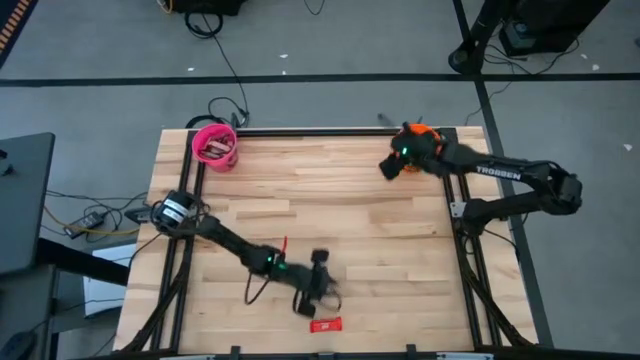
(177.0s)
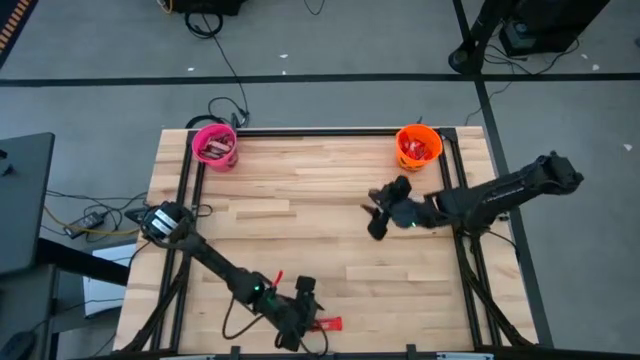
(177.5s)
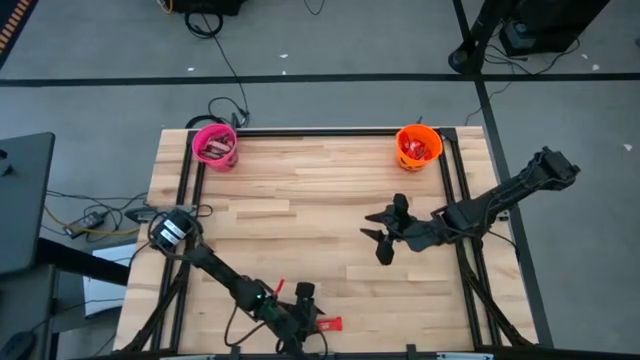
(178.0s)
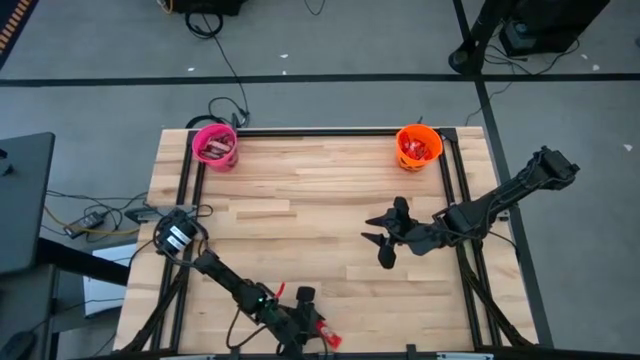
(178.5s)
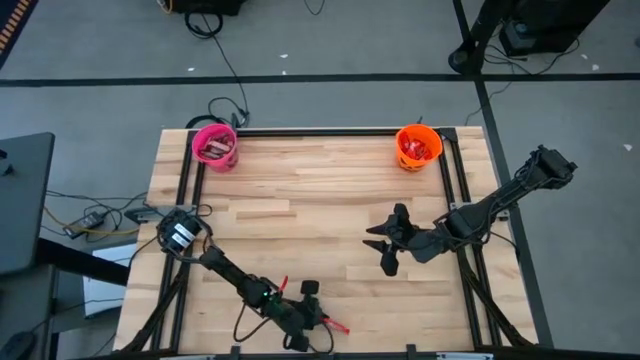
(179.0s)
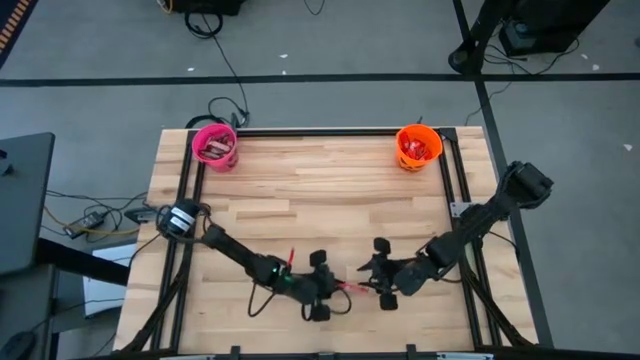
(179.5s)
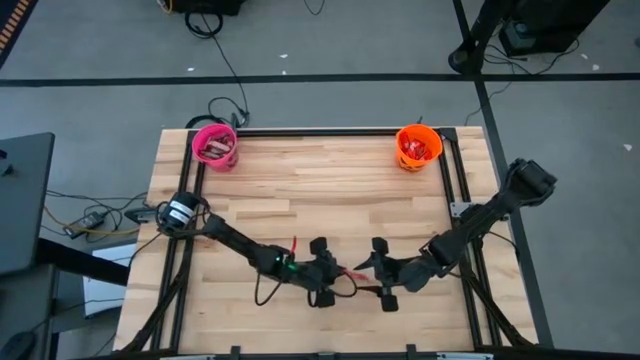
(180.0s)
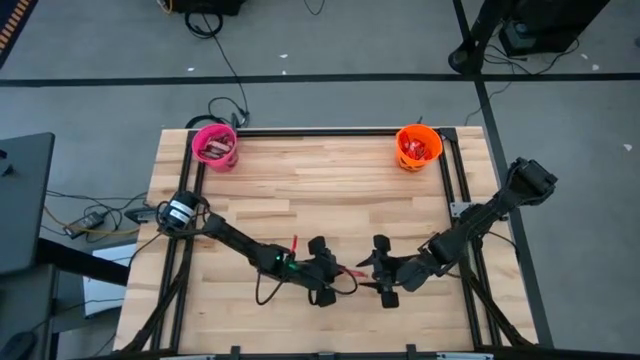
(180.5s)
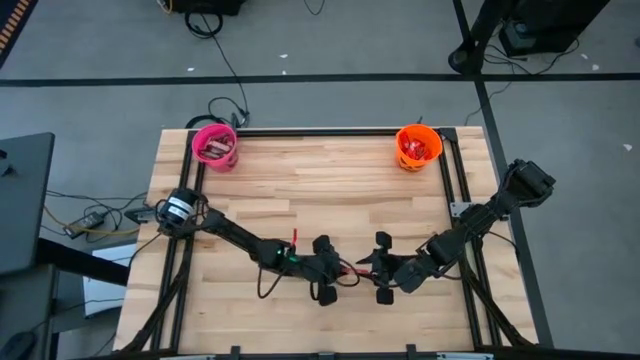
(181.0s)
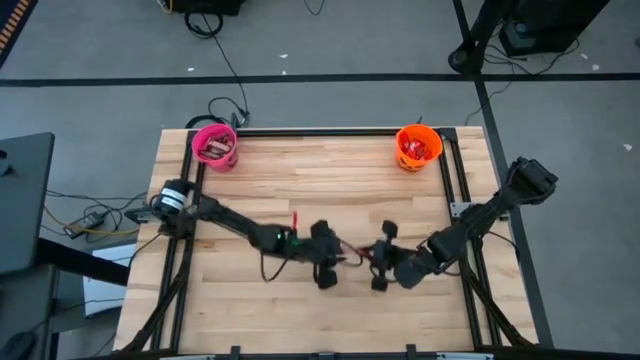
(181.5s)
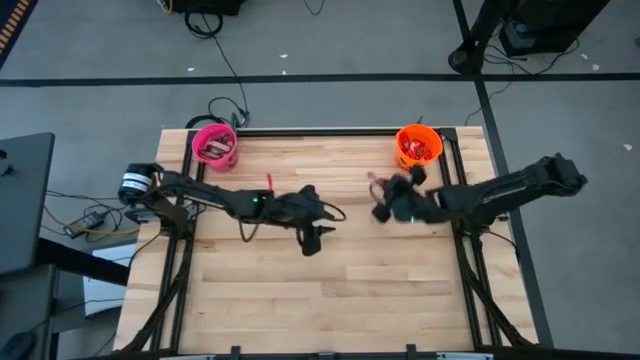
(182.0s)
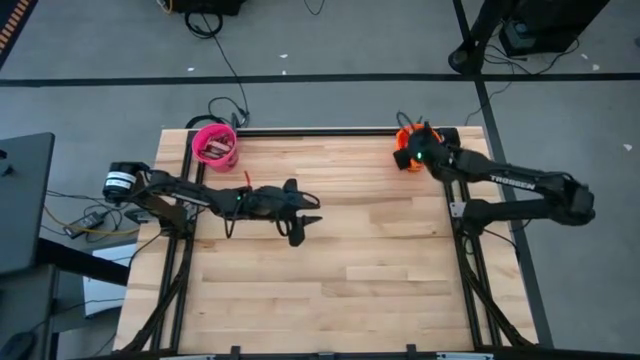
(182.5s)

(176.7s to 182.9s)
Task: Sort candy by brand, put in halloween buckets
Put the red chocolate bar into the orange bucket

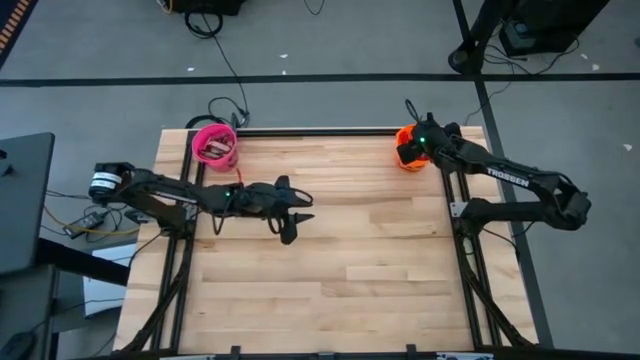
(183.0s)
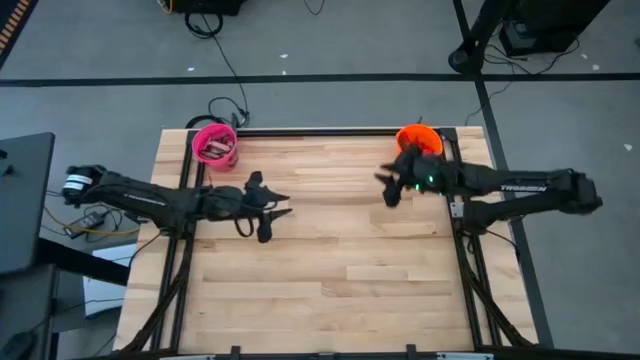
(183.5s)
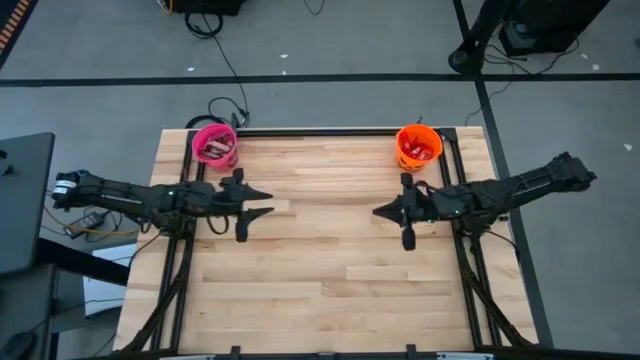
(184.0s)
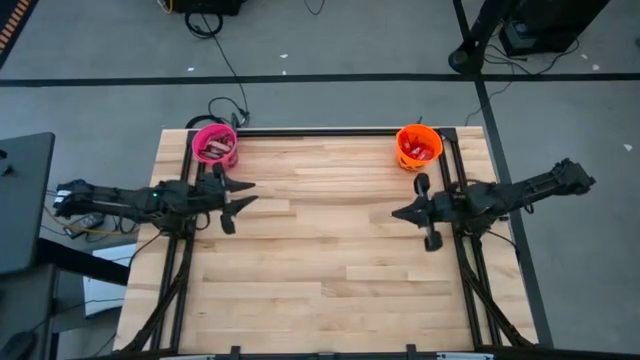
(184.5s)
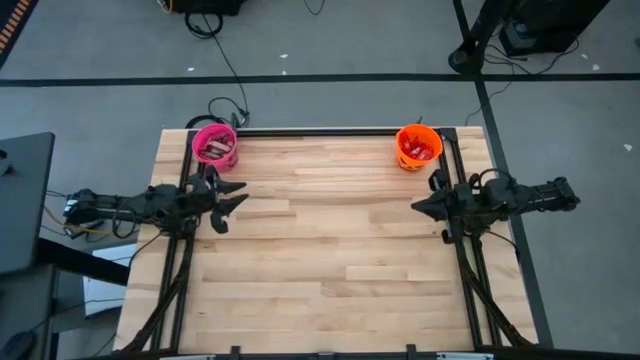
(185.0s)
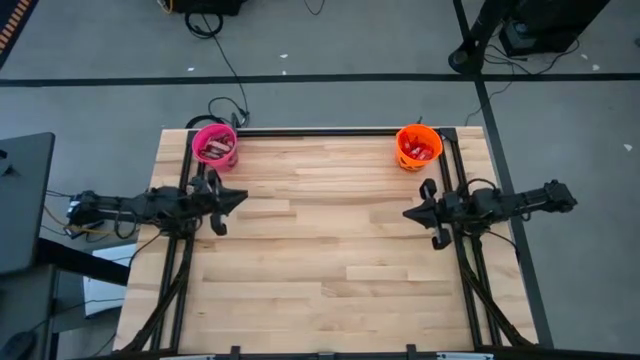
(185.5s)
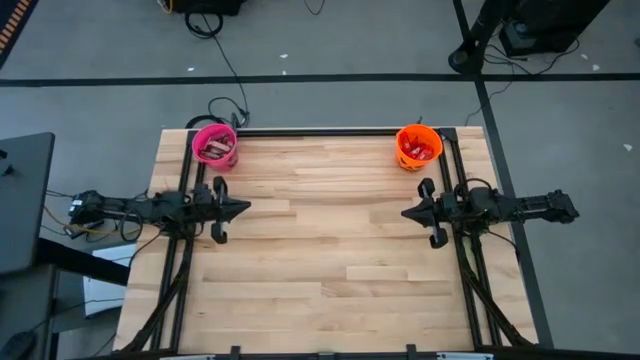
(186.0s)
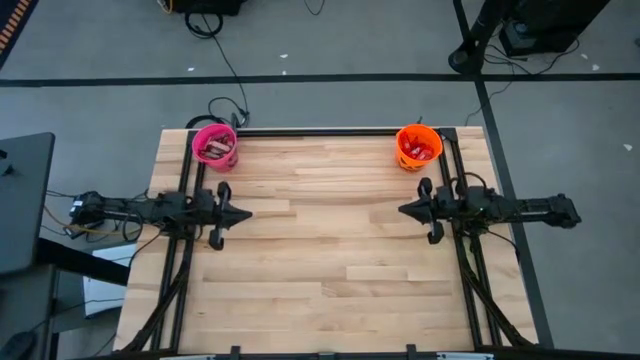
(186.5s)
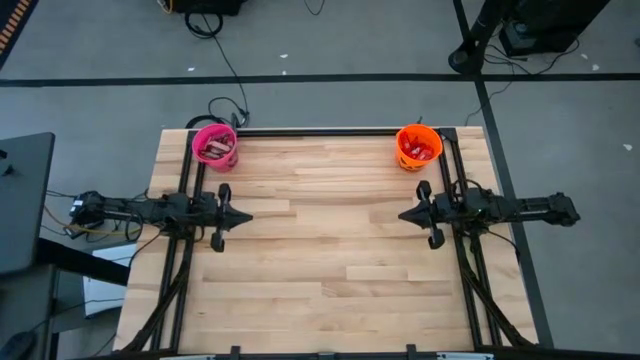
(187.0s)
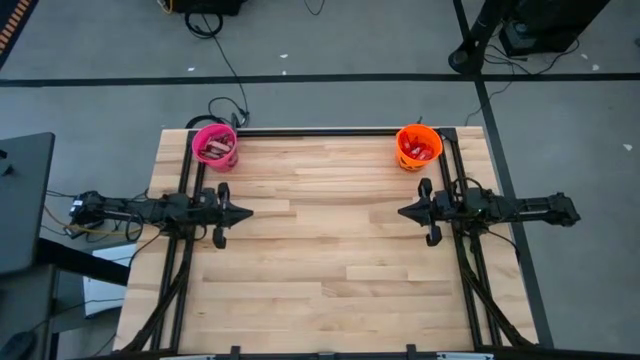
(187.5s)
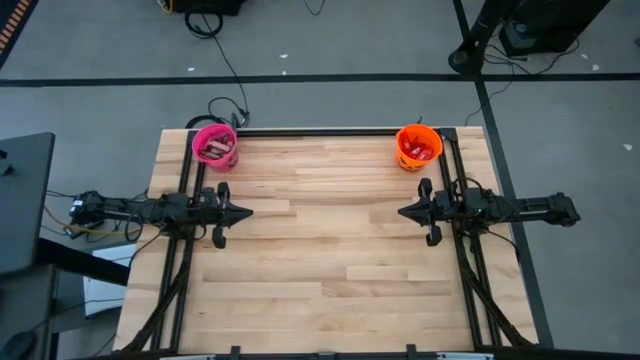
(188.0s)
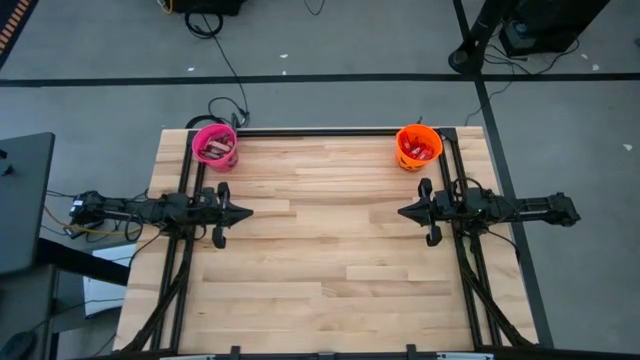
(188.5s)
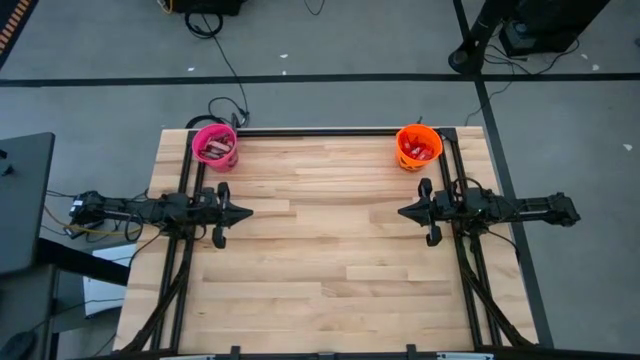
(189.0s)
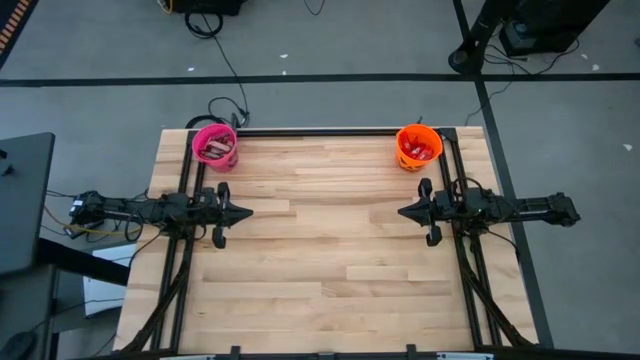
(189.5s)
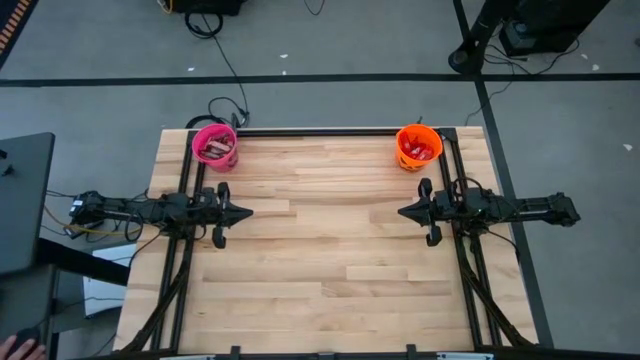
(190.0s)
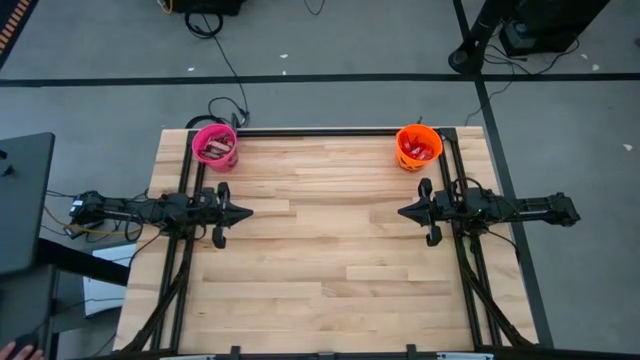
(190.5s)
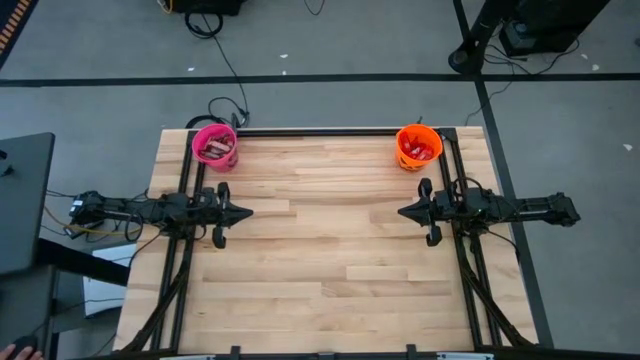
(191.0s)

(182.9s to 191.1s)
Return to Home Position

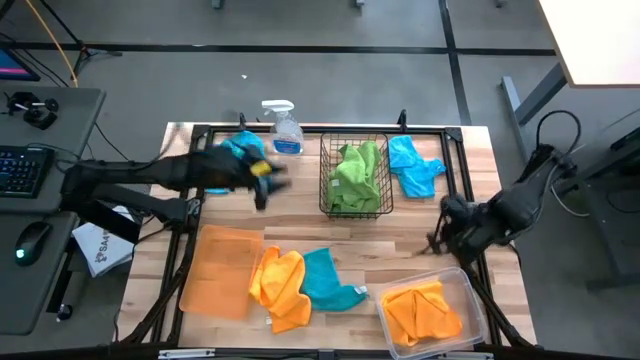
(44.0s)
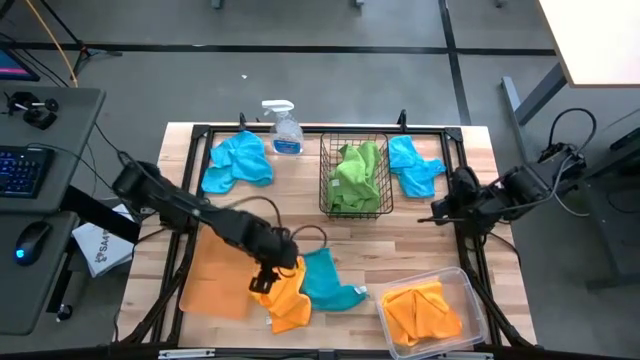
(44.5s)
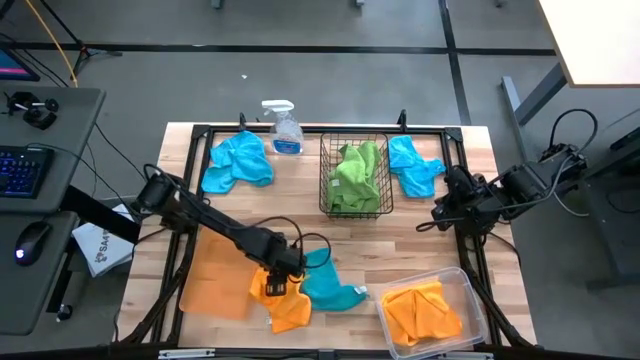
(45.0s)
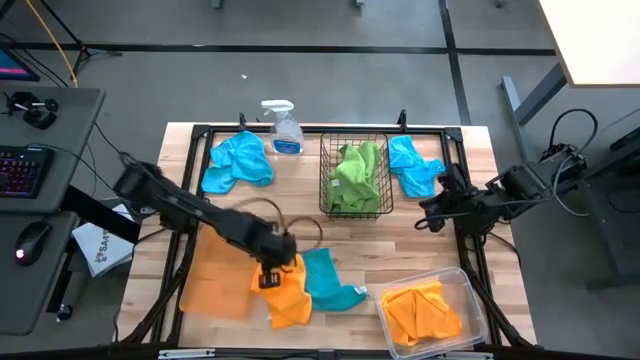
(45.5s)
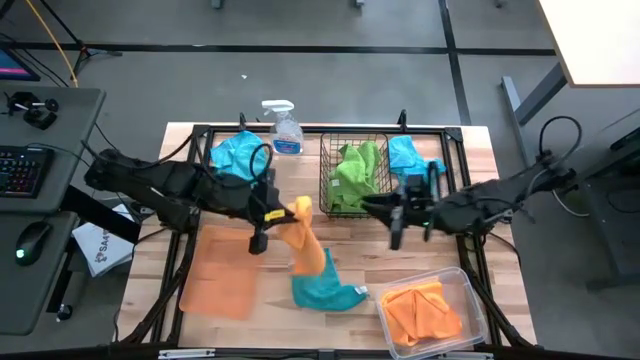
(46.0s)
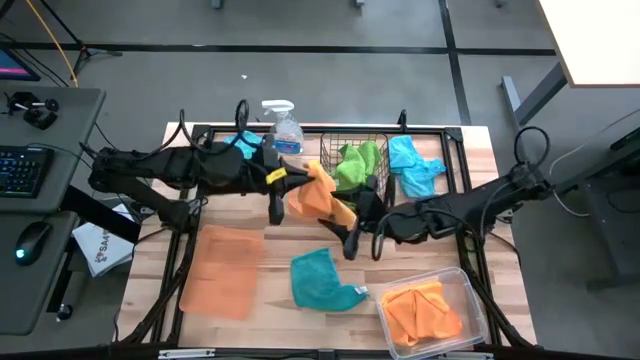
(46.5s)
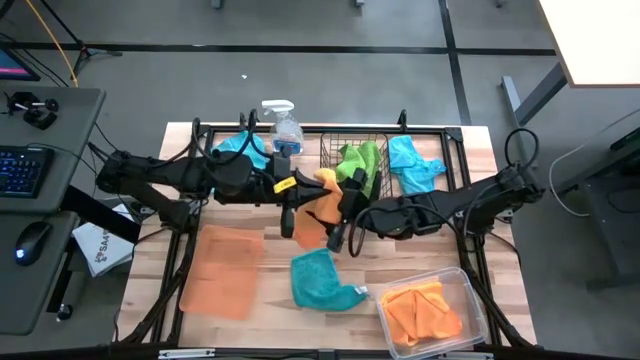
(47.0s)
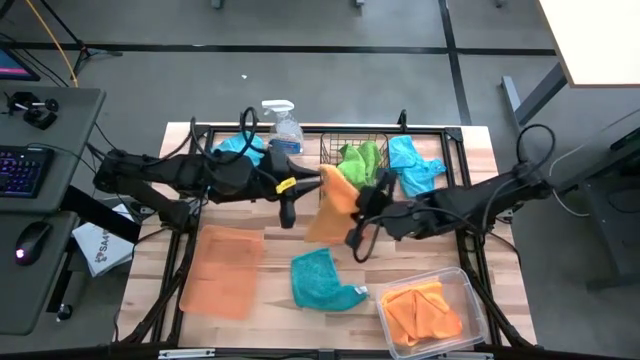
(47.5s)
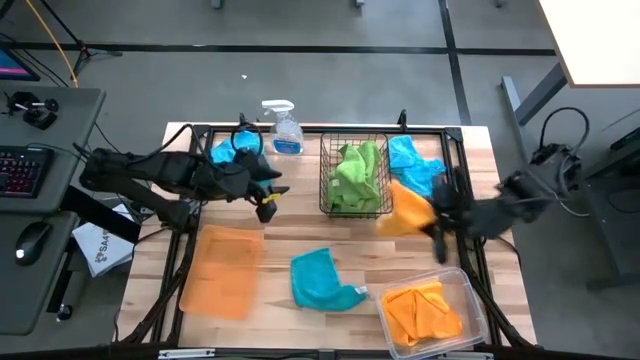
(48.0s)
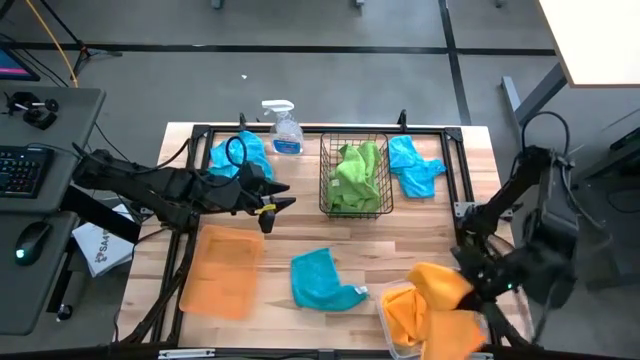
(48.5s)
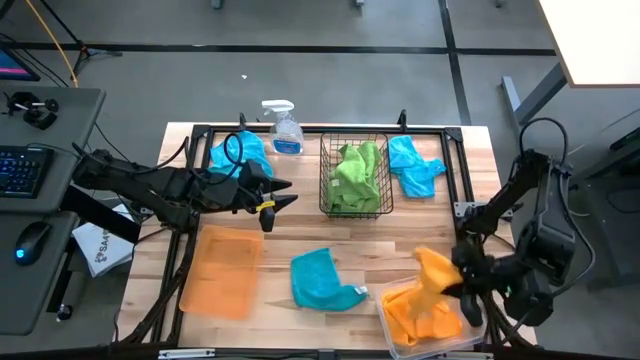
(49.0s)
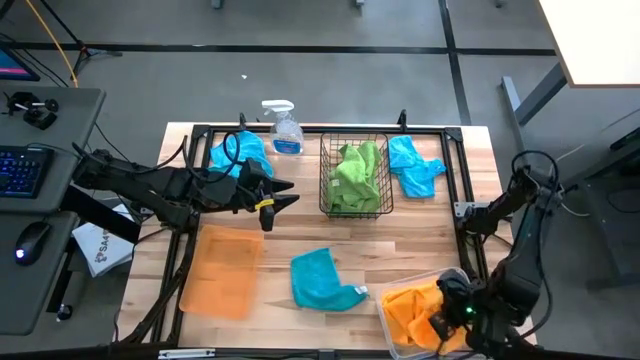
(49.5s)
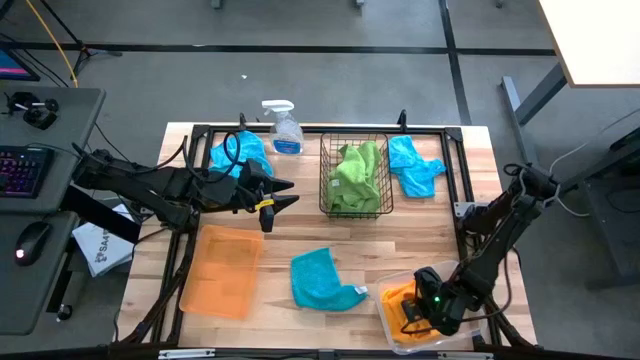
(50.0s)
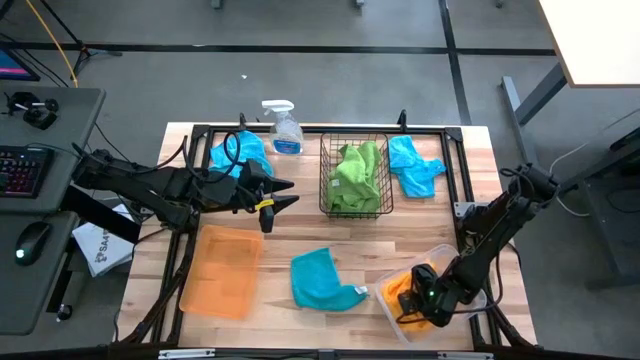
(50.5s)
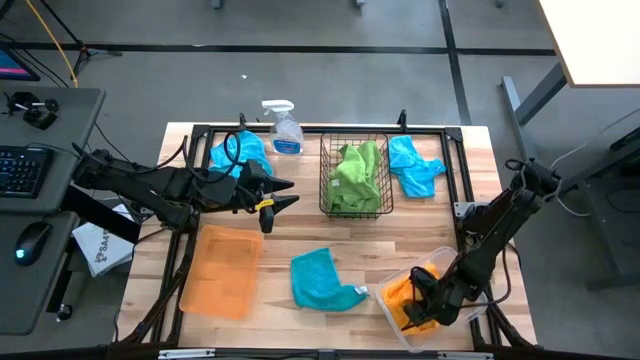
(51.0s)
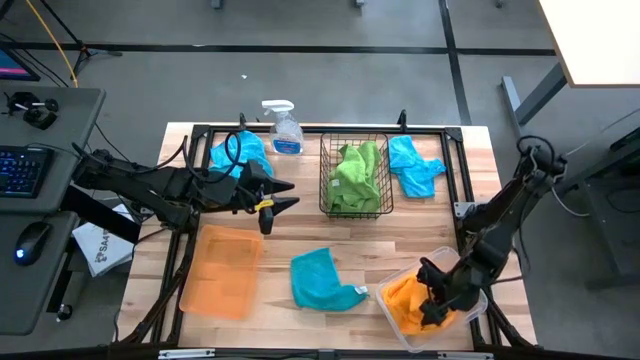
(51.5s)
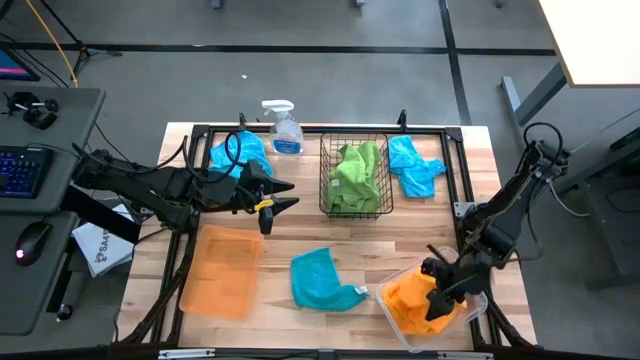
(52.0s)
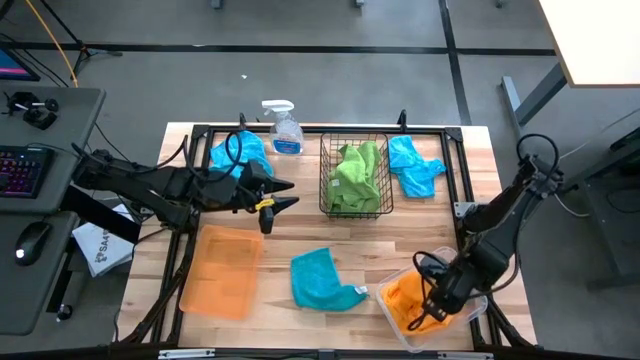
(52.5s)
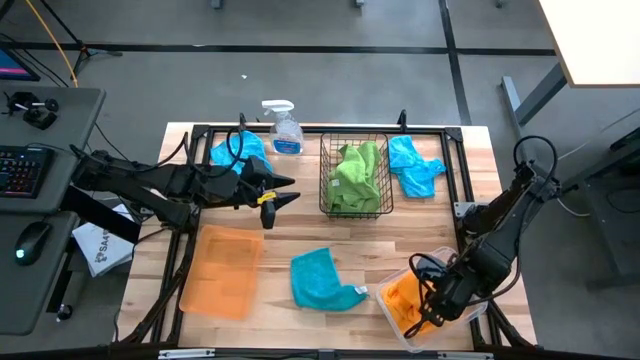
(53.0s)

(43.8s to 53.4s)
Task: Sort microfiber towel by color & place in baskets
Put the orange microfiber cloth into the transparent bin
